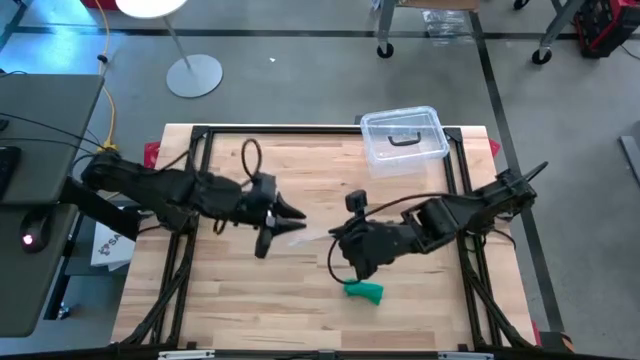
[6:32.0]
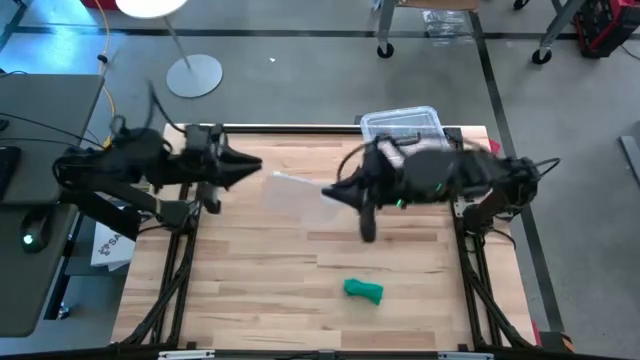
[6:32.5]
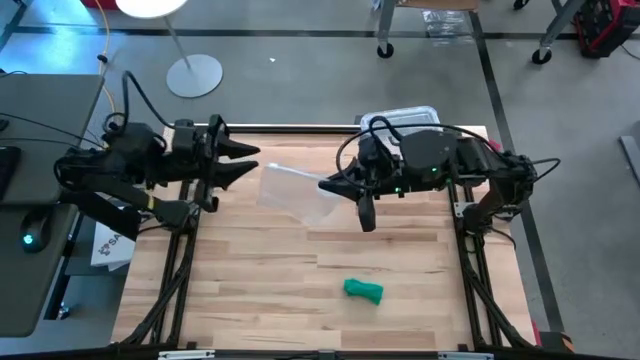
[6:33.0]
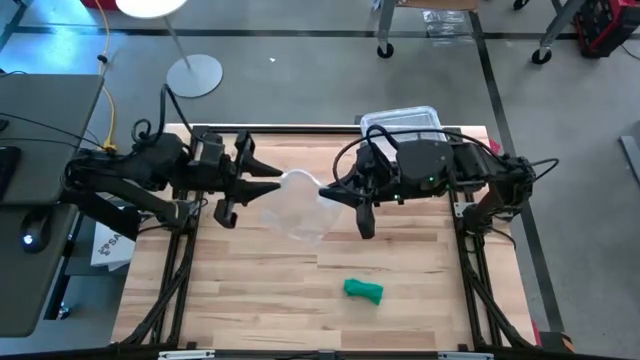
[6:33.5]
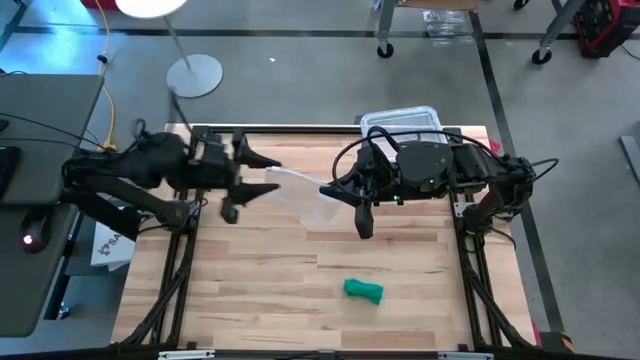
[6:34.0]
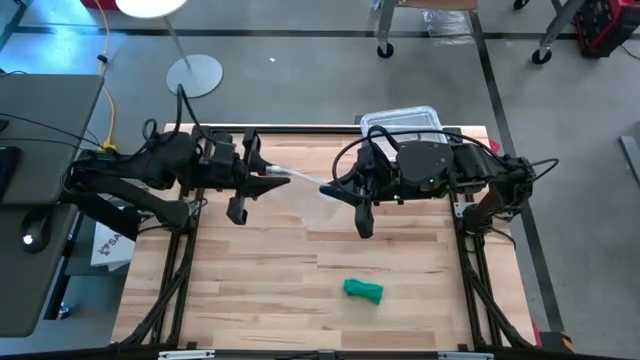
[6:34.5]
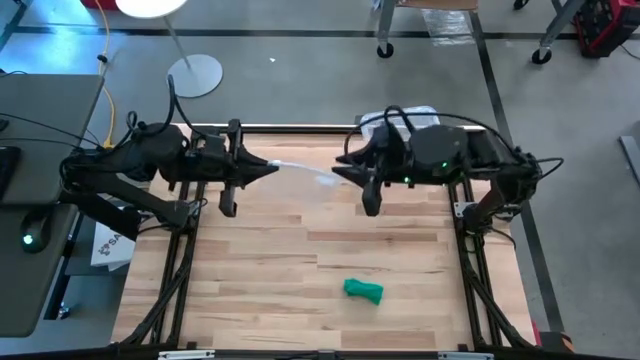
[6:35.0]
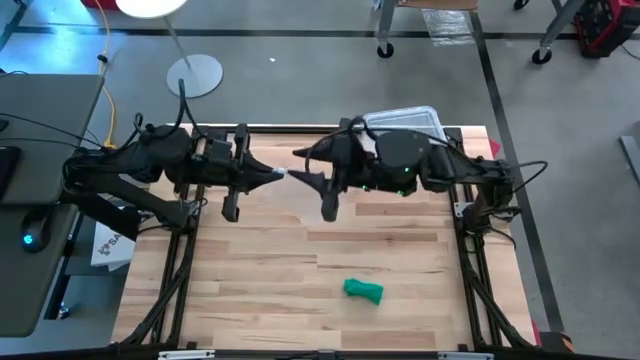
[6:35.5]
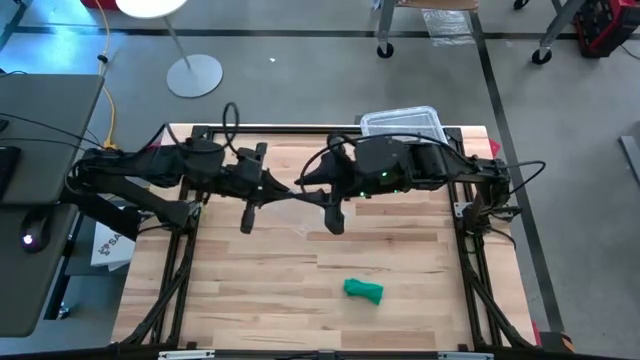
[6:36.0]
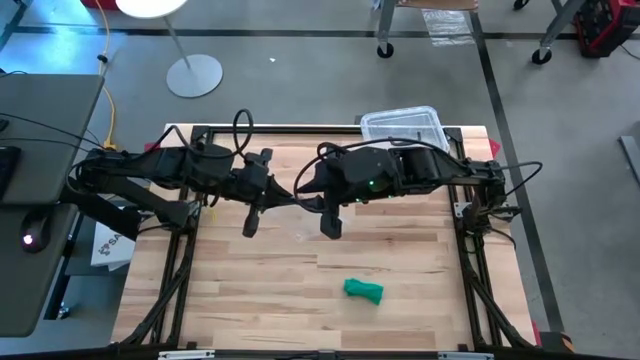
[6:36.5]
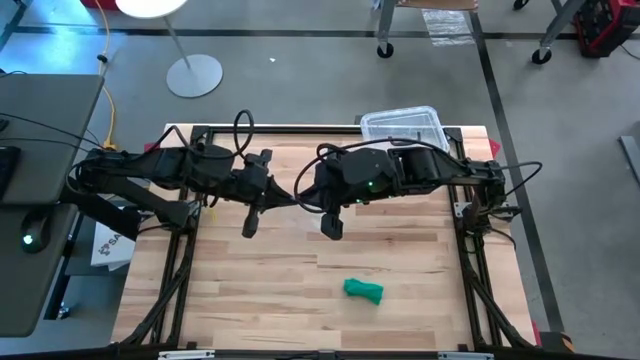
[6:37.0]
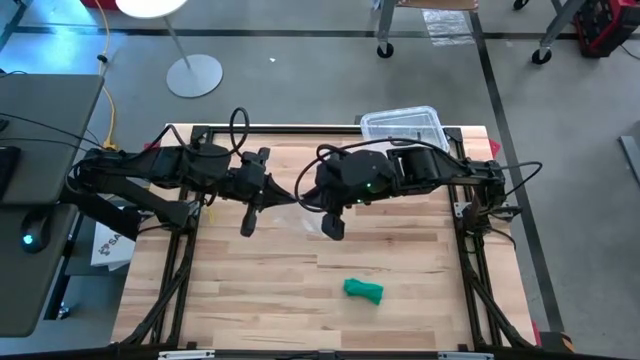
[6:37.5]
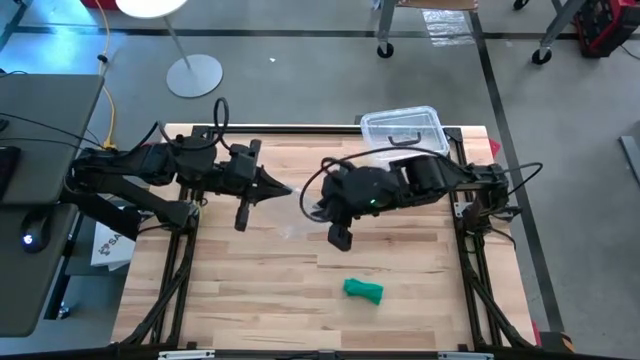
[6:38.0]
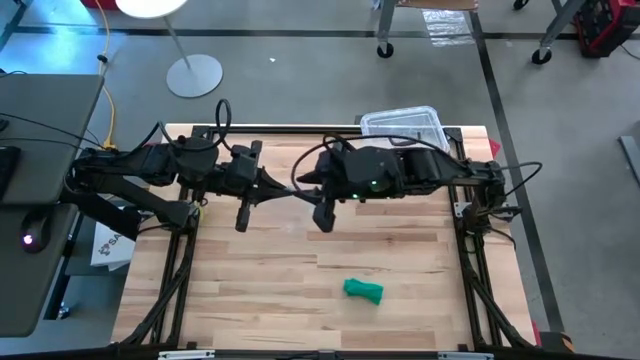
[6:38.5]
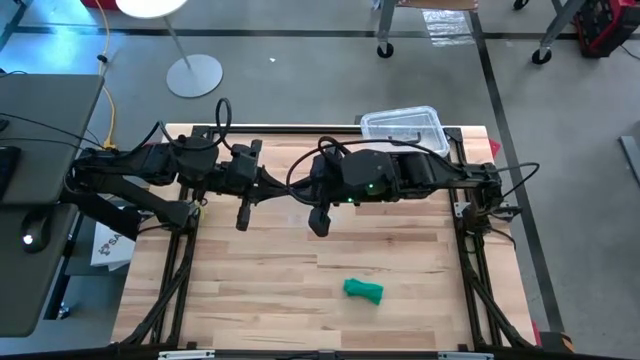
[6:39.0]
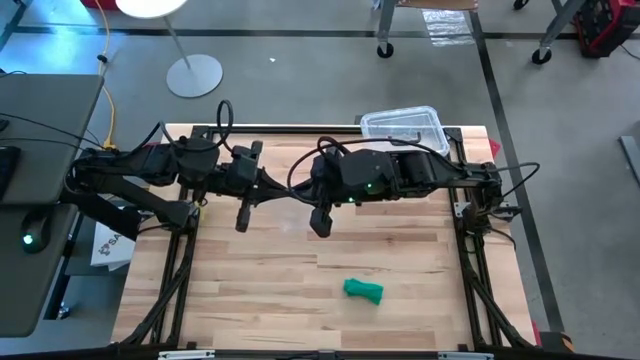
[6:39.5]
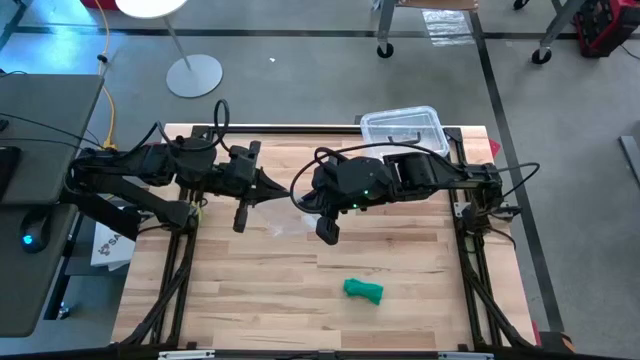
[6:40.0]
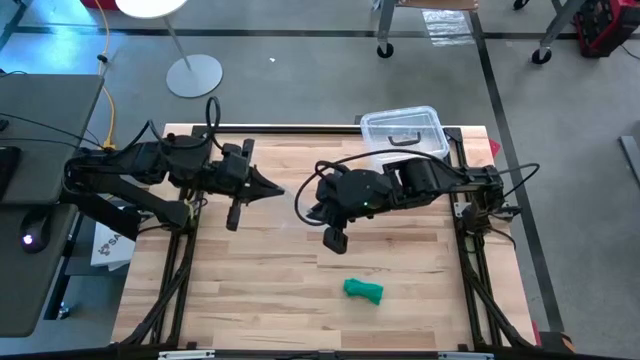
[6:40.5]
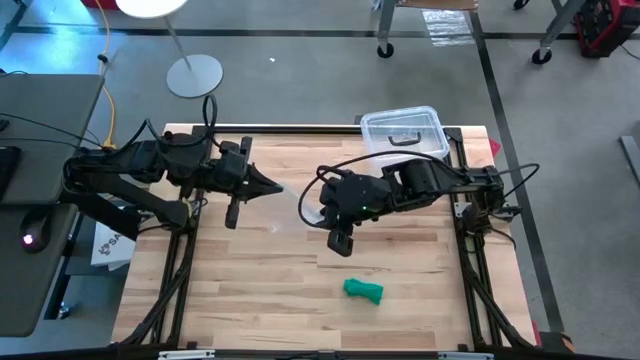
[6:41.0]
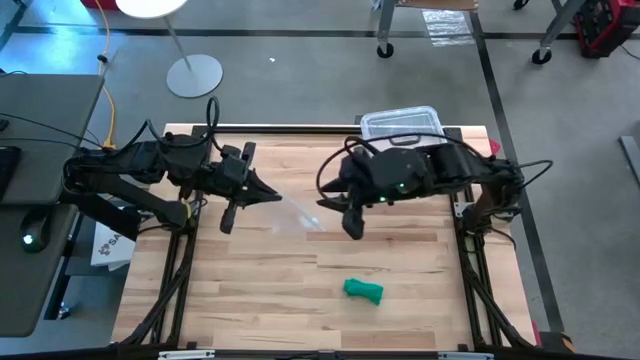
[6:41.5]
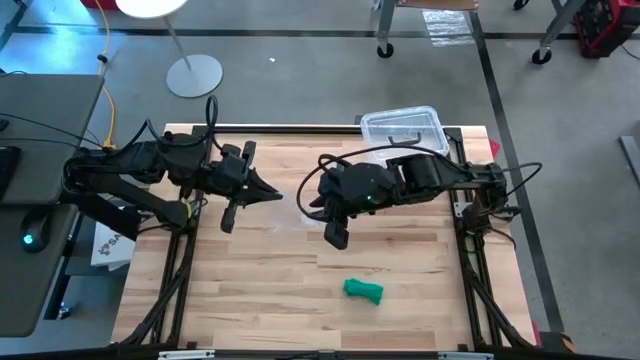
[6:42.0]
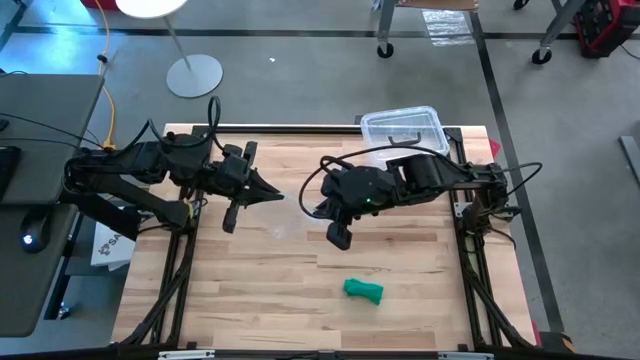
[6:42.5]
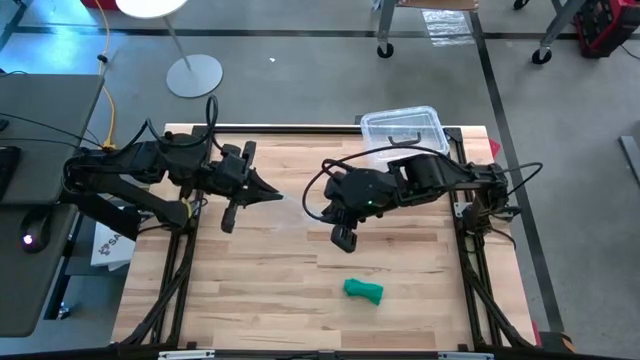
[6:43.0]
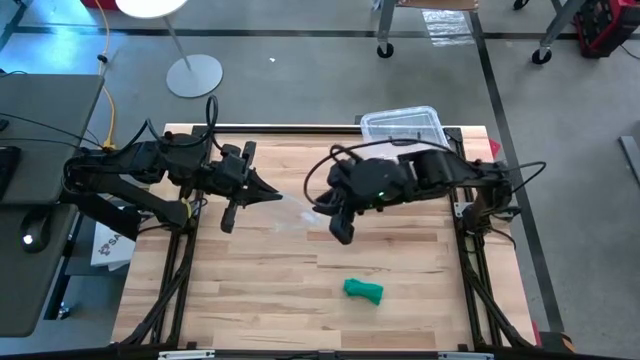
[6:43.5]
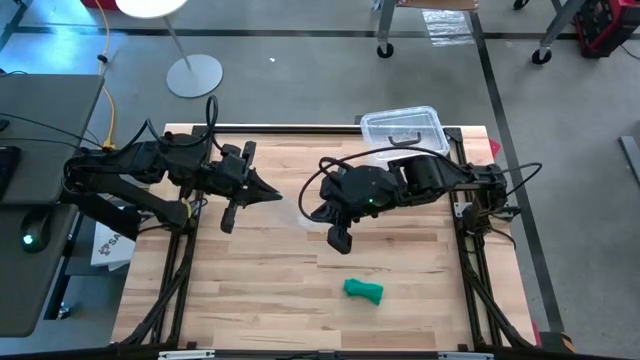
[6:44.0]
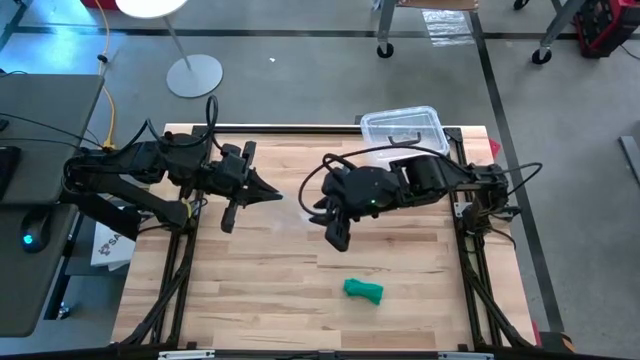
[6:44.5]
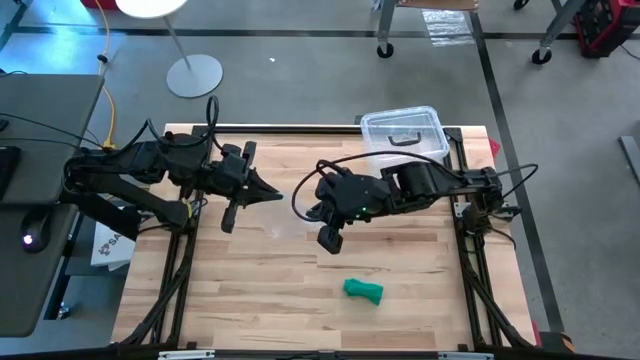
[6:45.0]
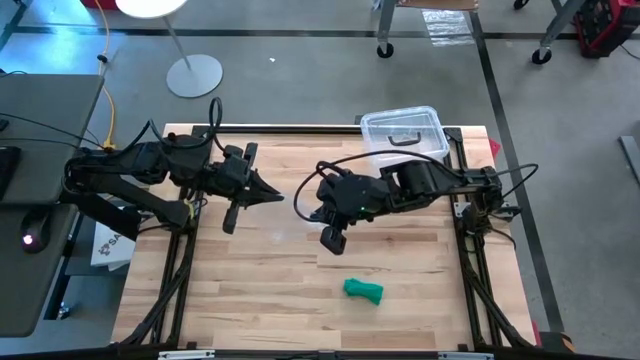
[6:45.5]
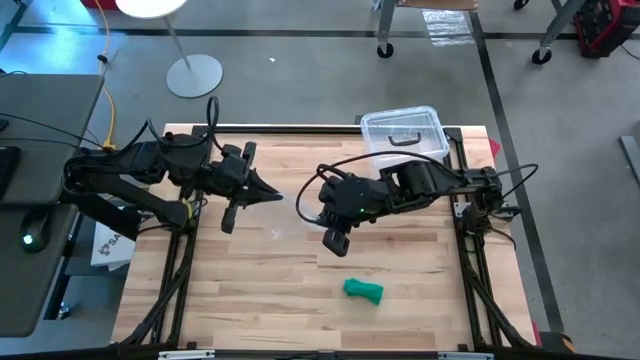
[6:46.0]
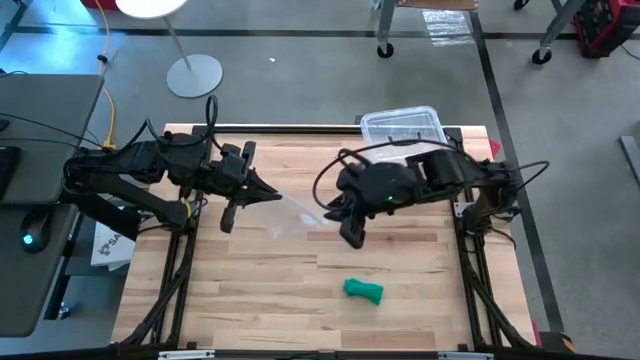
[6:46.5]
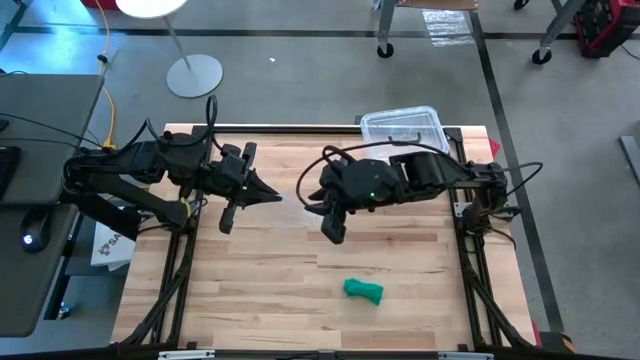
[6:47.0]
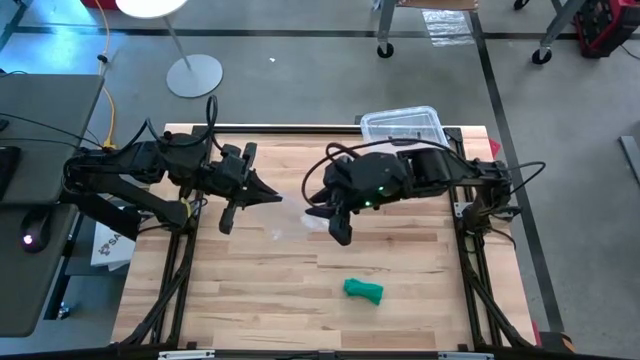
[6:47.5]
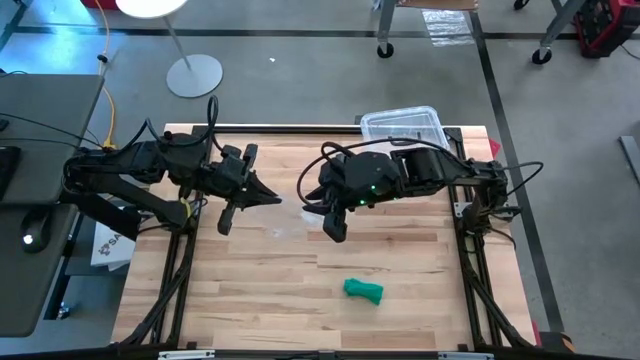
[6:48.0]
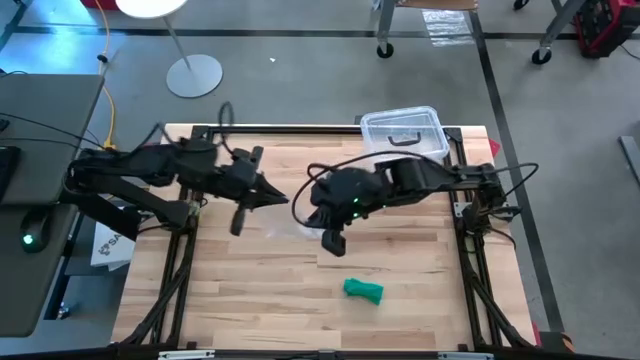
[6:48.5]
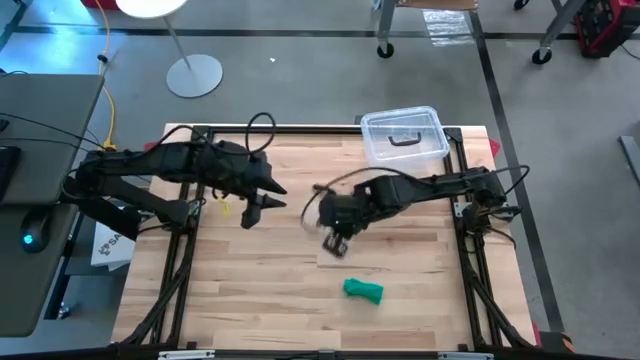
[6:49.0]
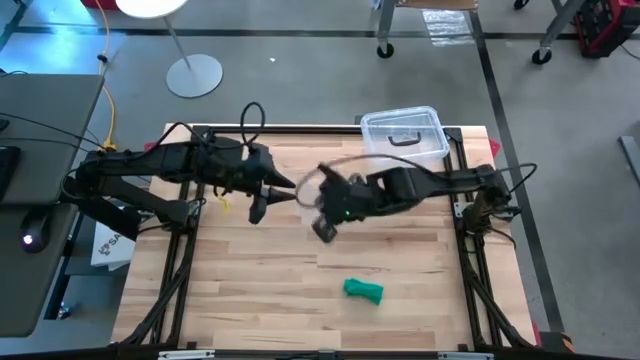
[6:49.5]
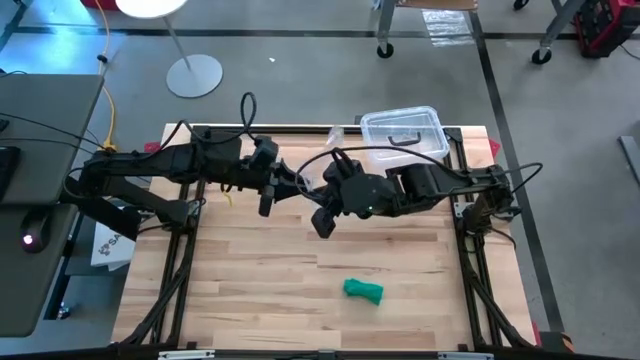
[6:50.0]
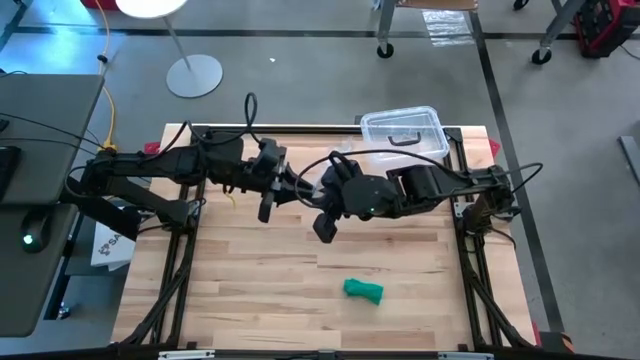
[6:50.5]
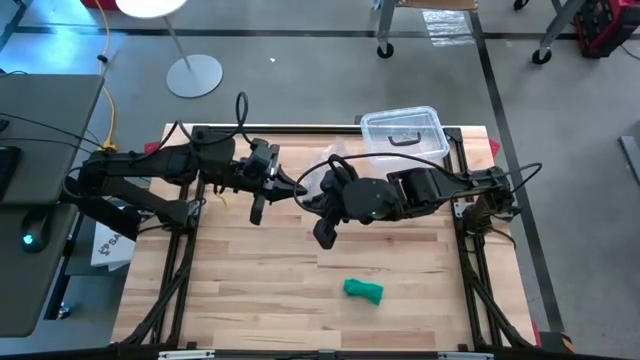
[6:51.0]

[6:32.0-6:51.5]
Task: Roll bandage
Open the transparent zip bag

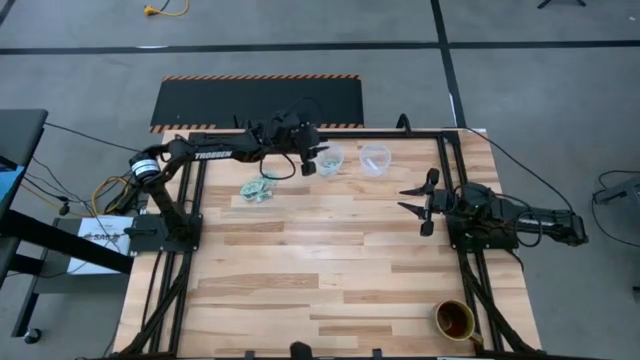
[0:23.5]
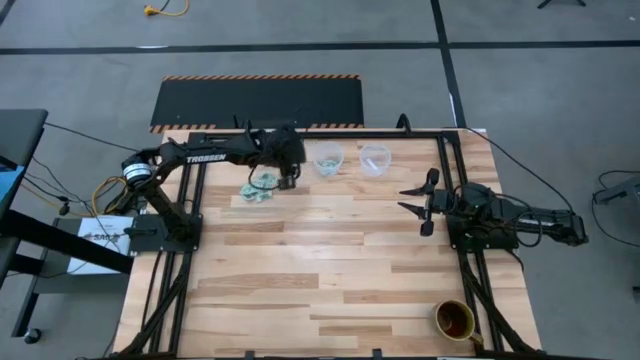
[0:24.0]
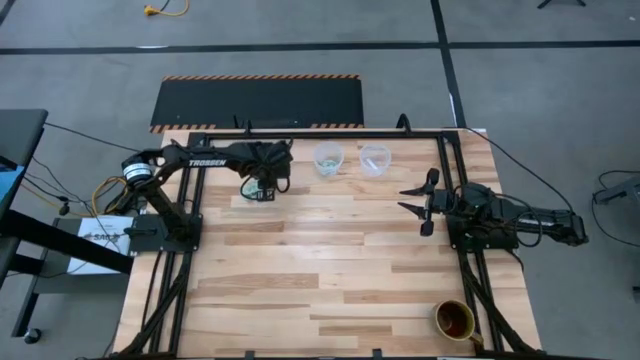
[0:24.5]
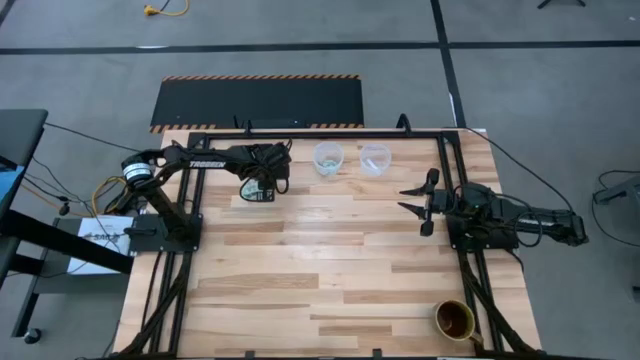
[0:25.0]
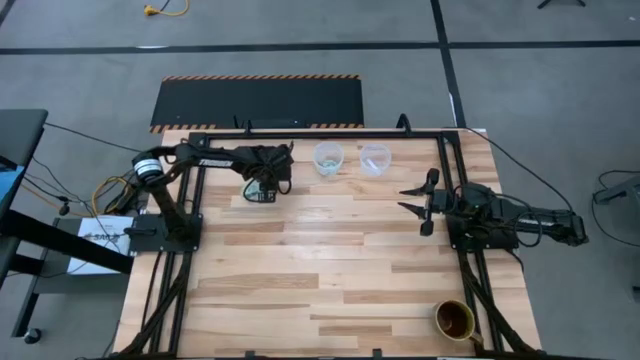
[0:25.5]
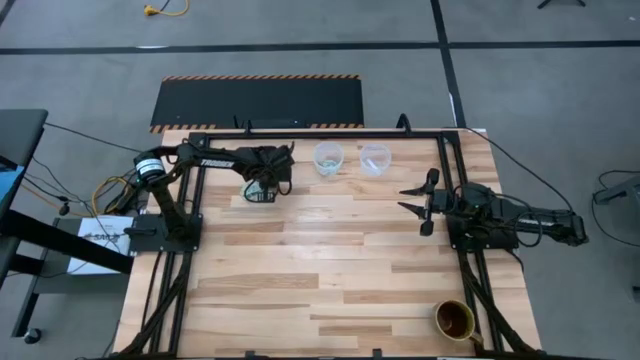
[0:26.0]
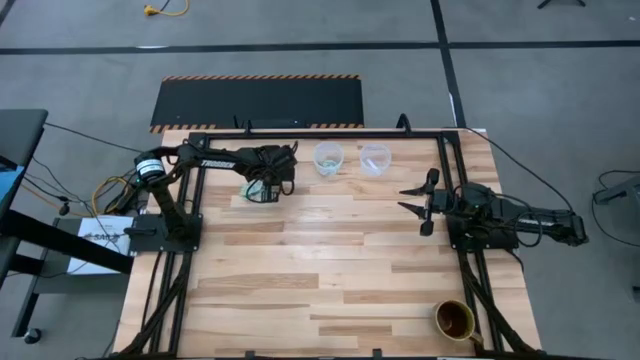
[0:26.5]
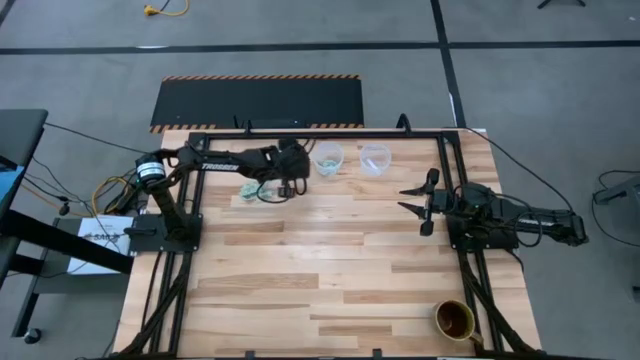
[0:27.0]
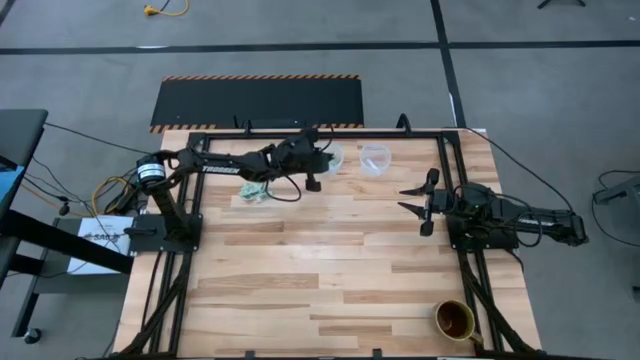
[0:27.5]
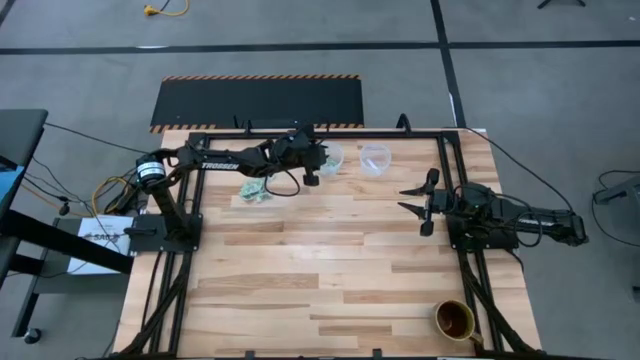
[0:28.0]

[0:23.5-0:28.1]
Task: Pick and place Stevia / Truvia into bins
Put the stevia packet into the left transparent container
